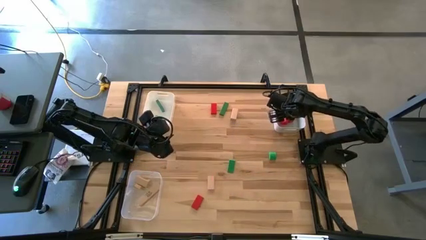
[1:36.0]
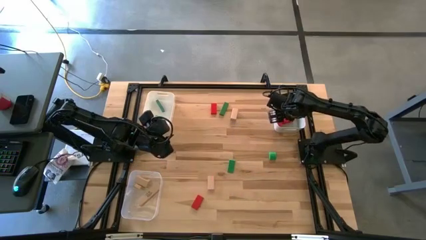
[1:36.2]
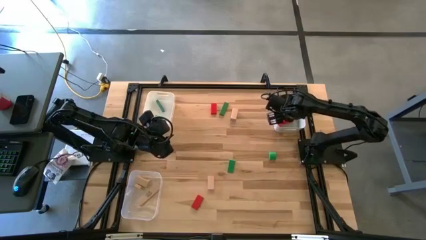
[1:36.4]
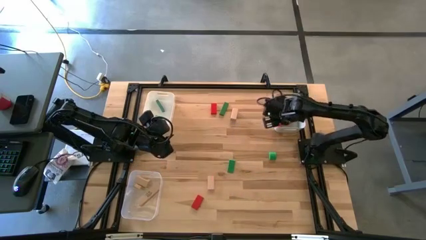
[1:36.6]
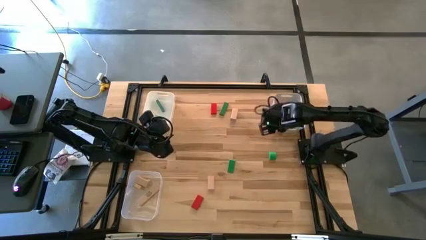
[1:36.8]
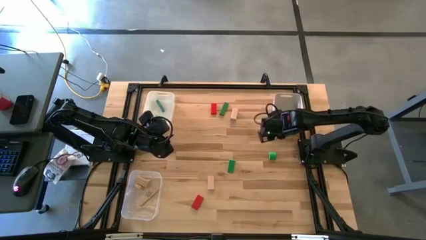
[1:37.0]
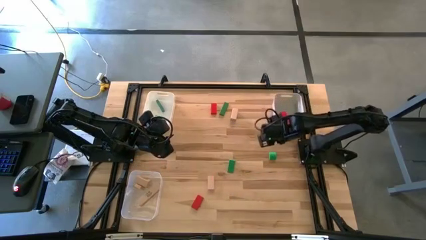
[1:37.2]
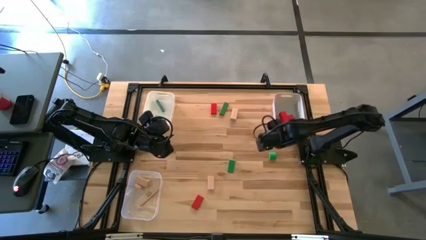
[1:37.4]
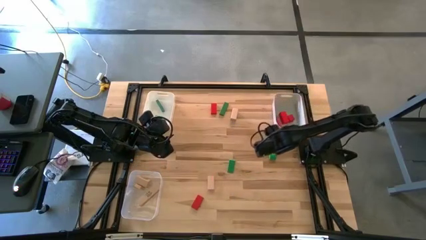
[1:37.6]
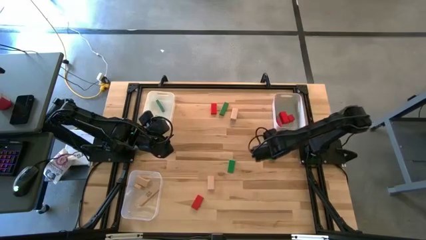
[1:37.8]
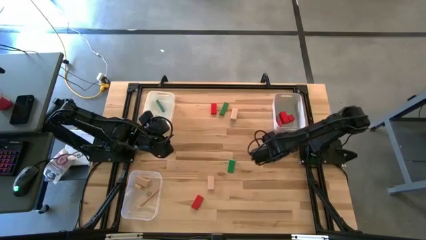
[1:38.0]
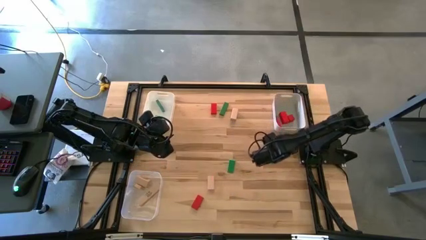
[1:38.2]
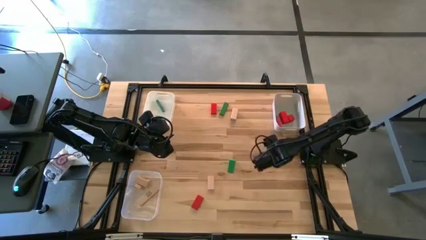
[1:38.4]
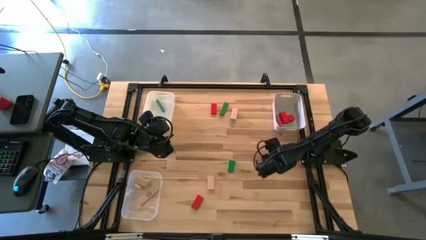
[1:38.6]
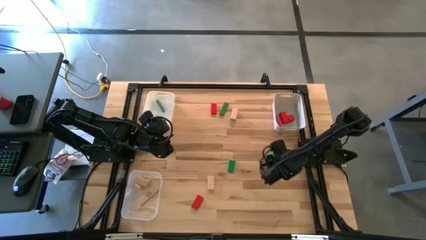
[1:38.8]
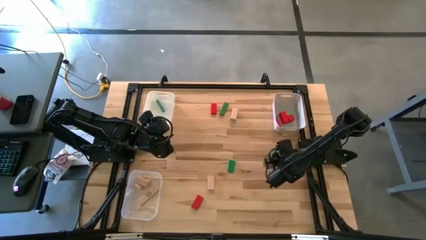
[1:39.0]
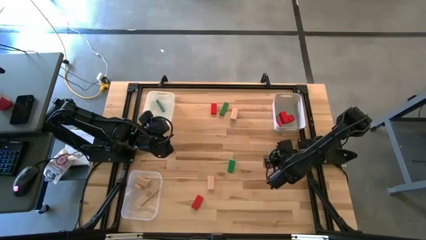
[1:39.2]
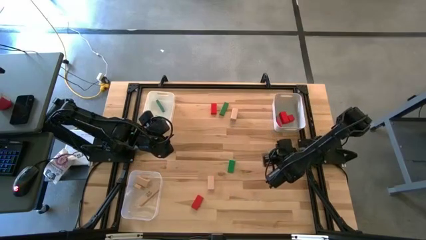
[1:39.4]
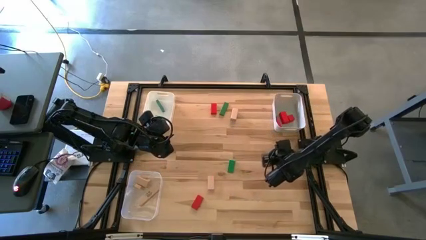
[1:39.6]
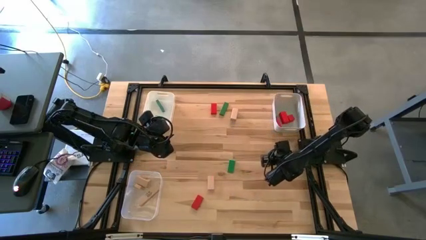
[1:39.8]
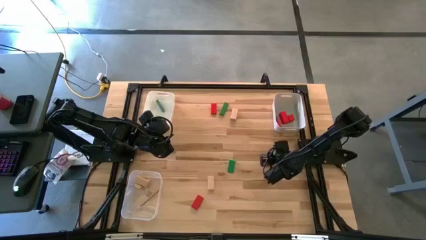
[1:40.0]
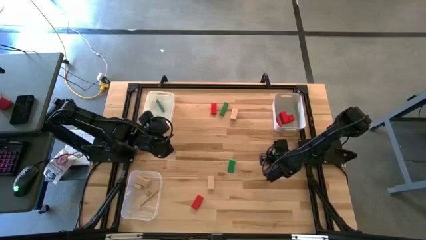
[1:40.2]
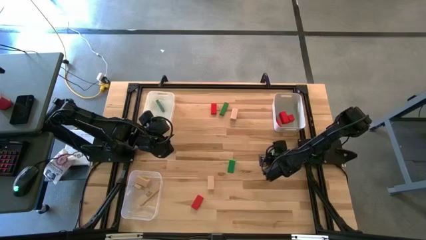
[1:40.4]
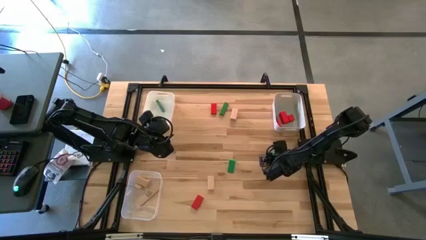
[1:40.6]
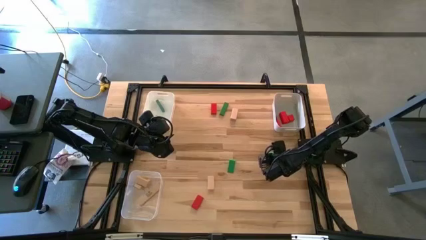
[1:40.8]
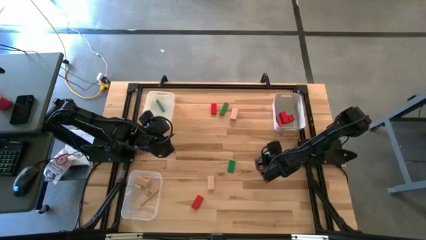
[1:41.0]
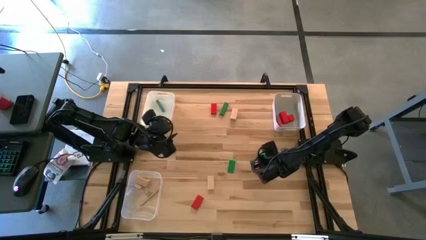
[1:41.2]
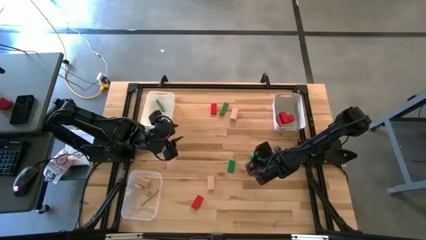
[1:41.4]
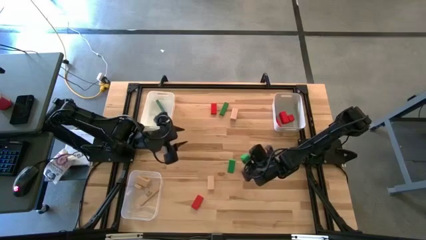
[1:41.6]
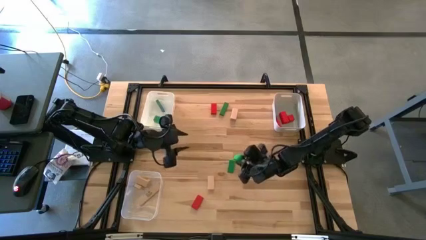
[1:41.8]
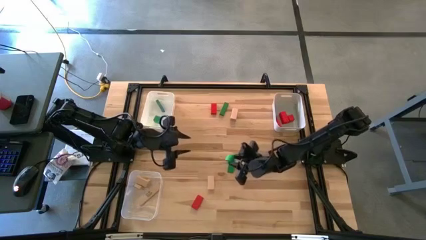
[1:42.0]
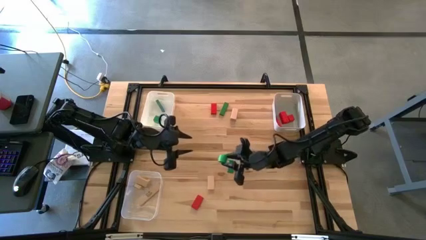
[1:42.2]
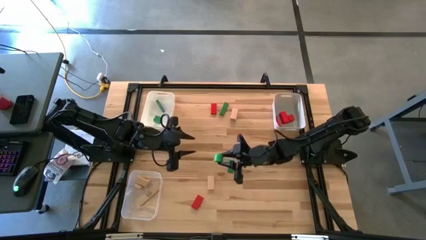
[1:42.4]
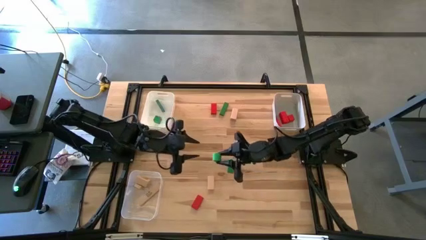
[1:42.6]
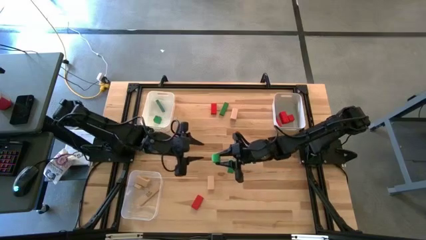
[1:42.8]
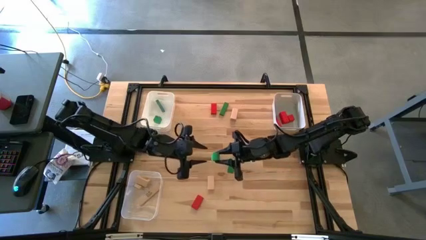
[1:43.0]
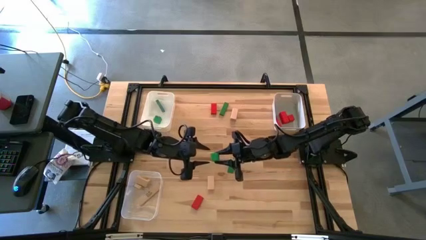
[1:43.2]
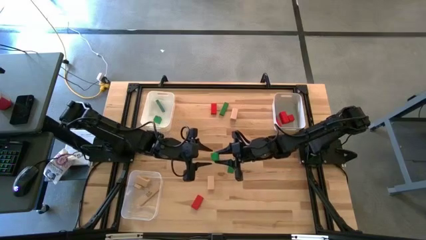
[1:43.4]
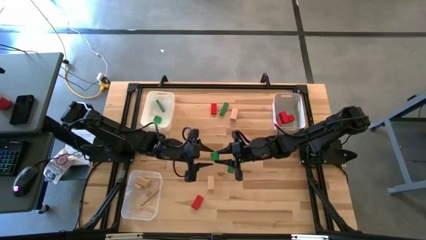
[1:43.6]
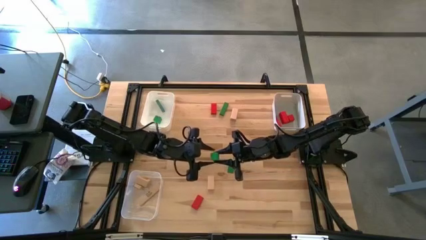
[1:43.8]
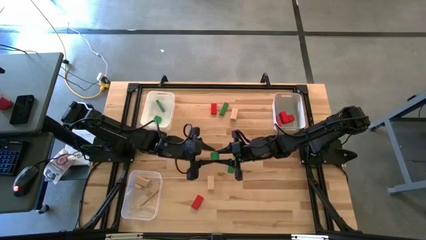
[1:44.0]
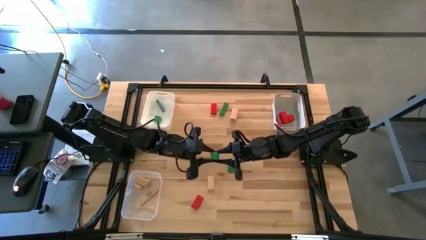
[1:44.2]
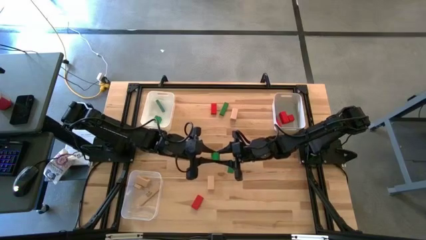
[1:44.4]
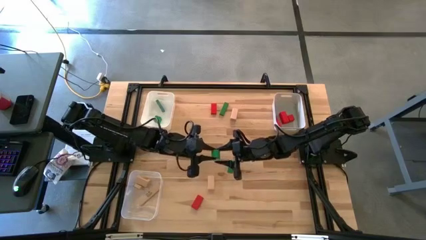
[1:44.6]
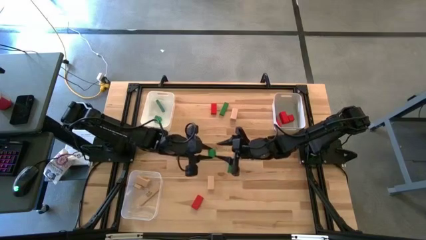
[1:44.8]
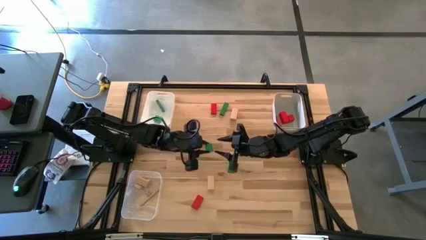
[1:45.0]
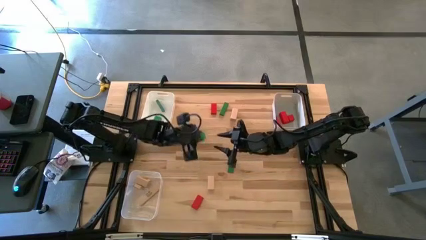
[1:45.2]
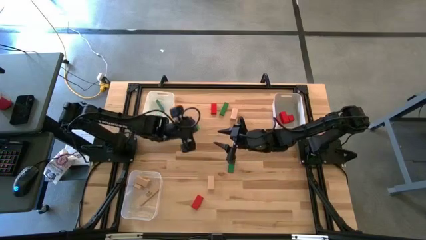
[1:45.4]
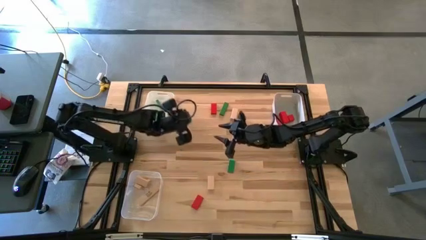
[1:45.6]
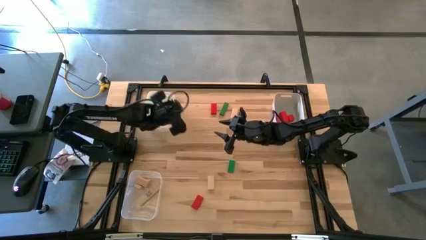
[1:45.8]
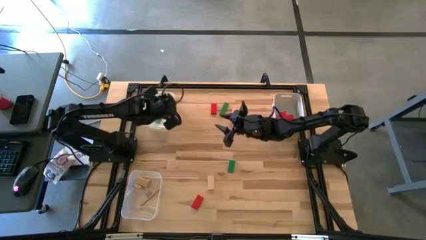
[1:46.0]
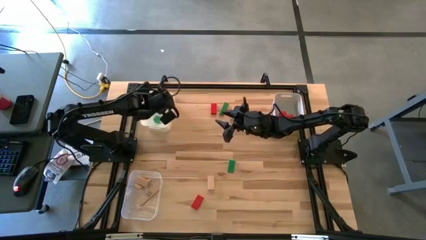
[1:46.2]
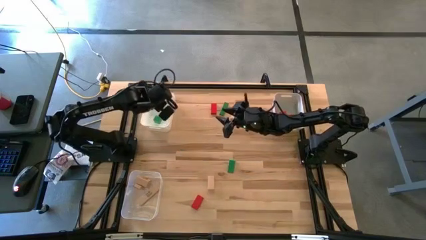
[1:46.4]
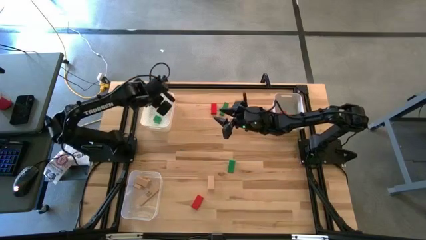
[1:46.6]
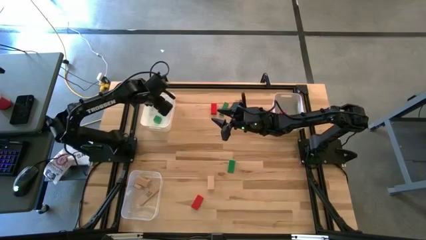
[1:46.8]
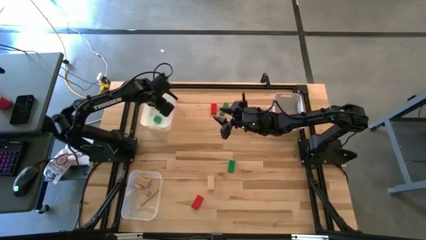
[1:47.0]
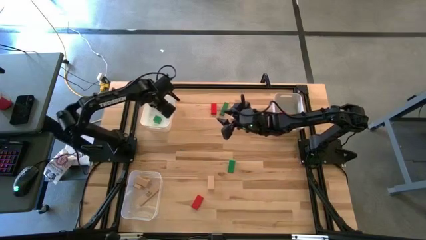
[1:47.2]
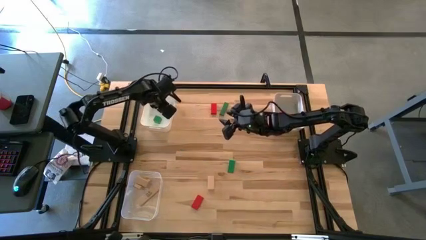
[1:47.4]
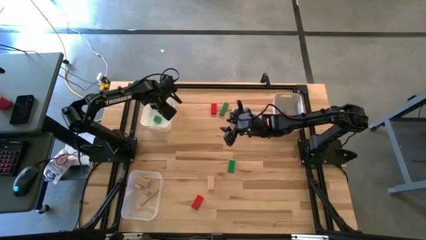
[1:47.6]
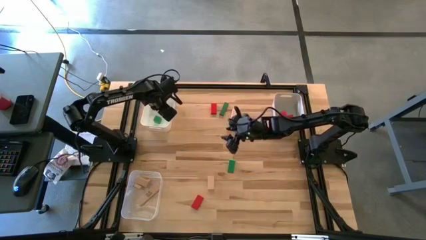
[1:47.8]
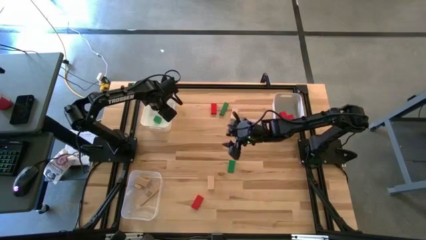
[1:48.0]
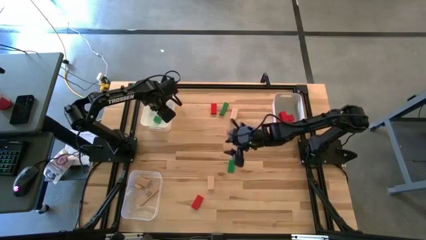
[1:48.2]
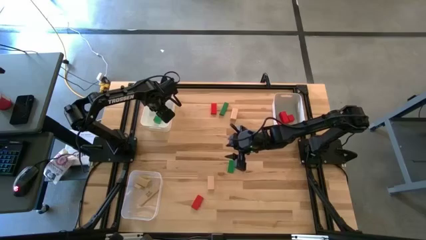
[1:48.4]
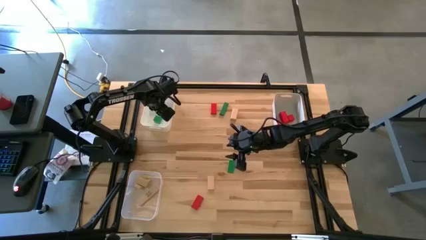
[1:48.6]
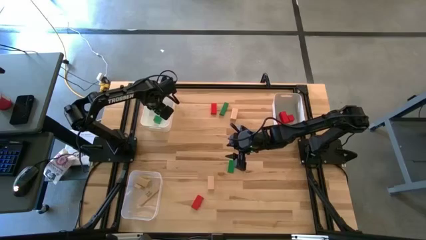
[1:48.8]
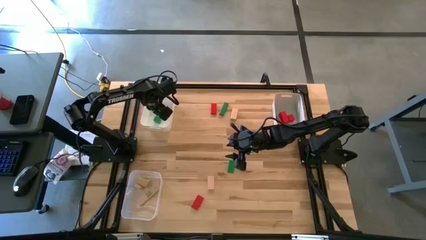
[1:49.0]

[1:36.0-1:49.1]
Task: Sort & place blocks by color
Put the green block into the white bin

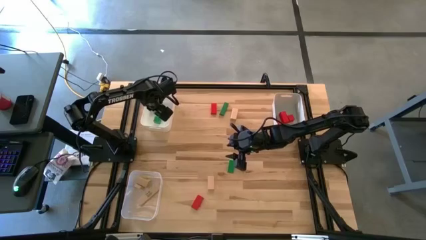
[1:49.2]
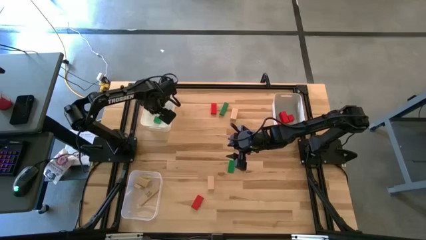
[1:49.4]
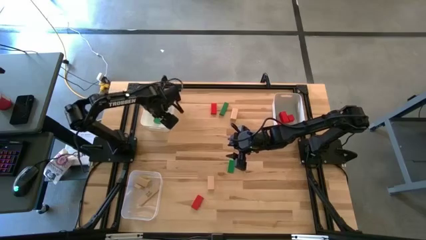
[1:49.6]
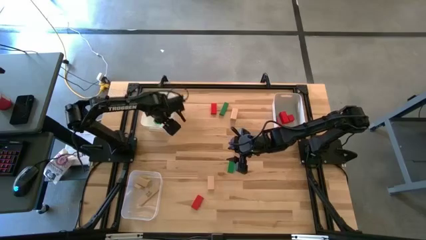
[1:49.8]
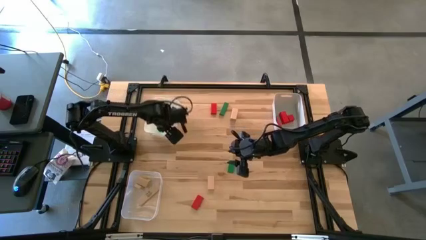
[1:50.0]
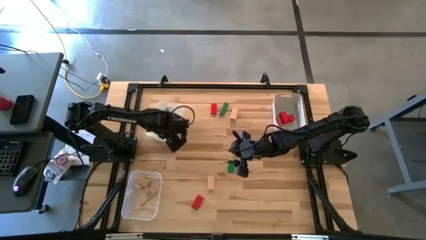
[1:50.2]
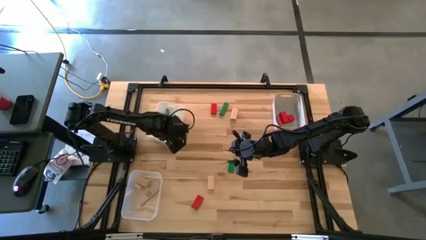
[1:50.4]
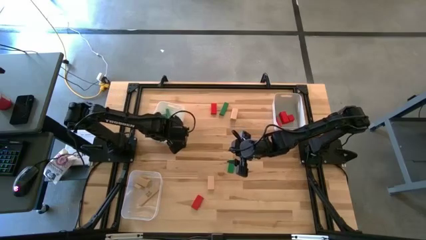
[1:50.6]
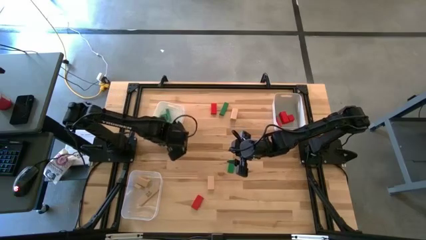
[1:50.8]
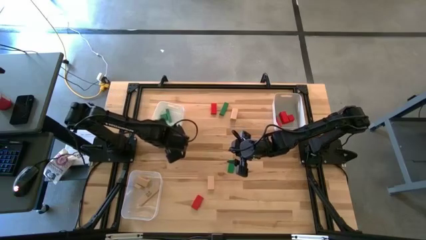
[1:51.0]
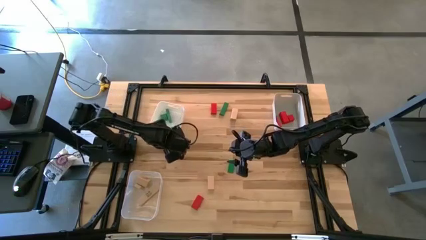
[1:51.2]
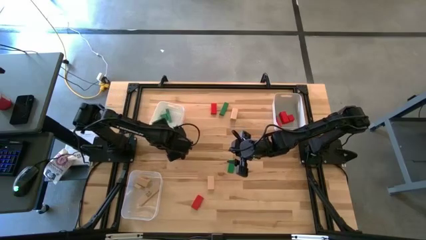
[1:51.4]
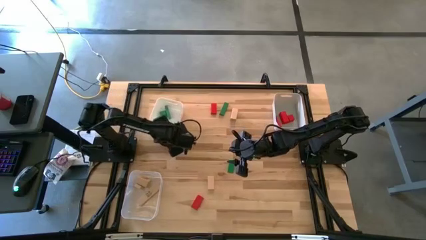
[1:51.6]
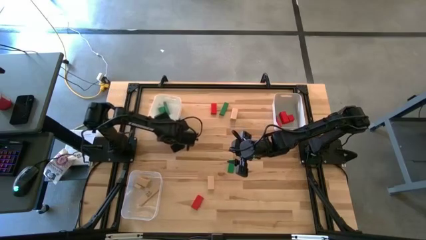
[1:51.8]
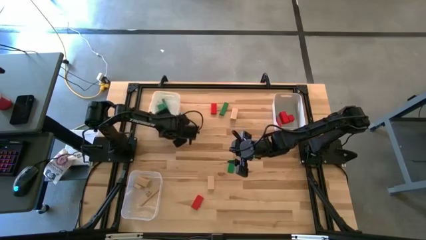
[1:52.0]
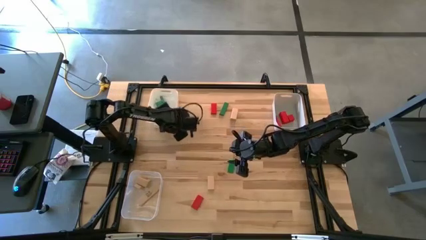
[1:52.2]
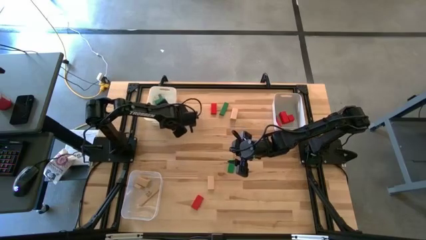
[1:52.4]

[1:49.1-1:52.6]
Adjust the white bin
